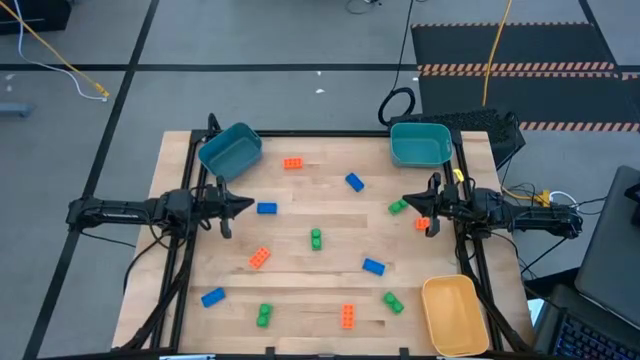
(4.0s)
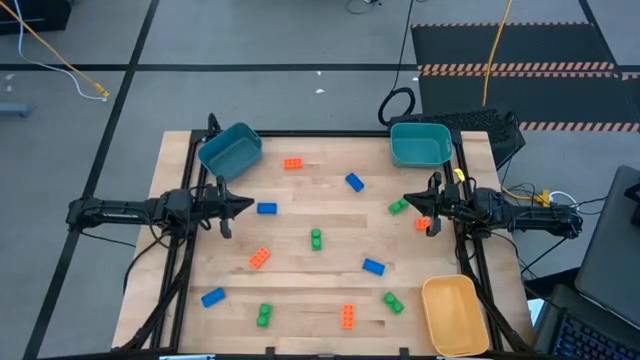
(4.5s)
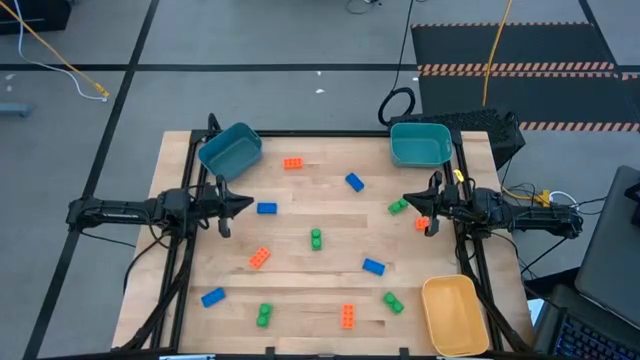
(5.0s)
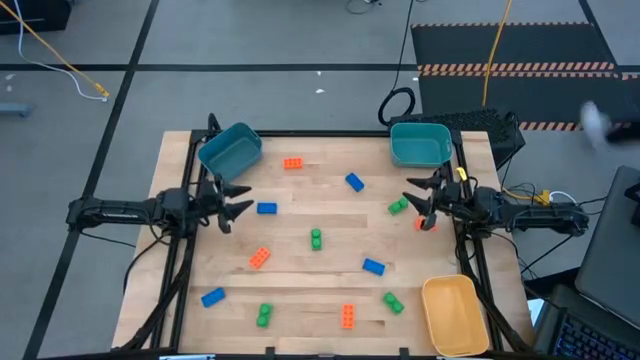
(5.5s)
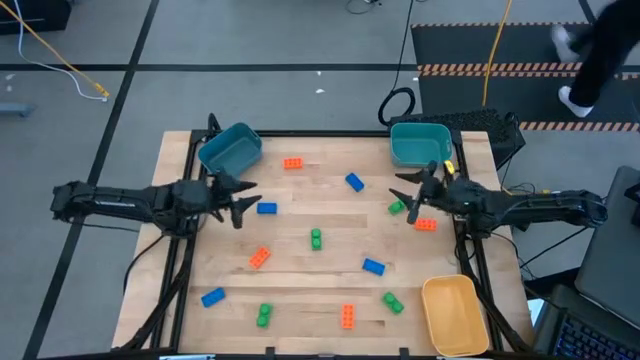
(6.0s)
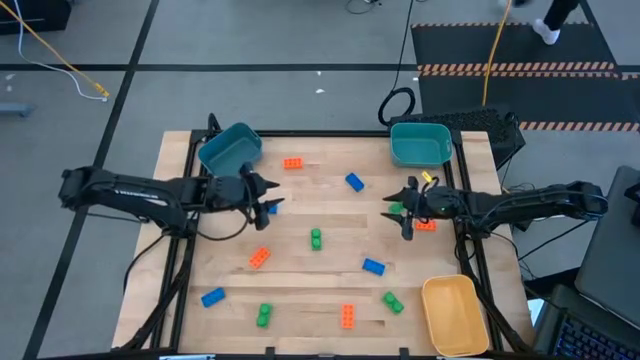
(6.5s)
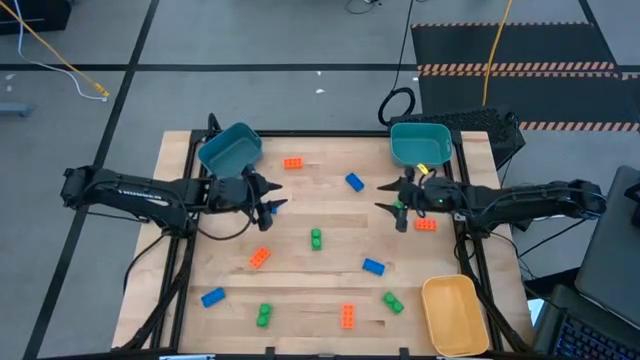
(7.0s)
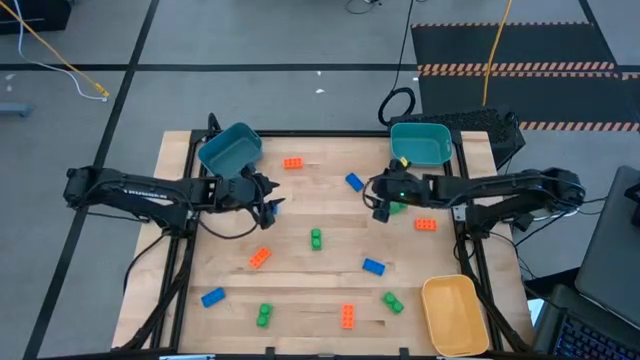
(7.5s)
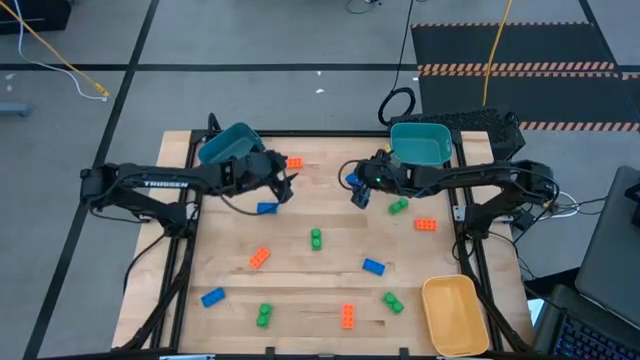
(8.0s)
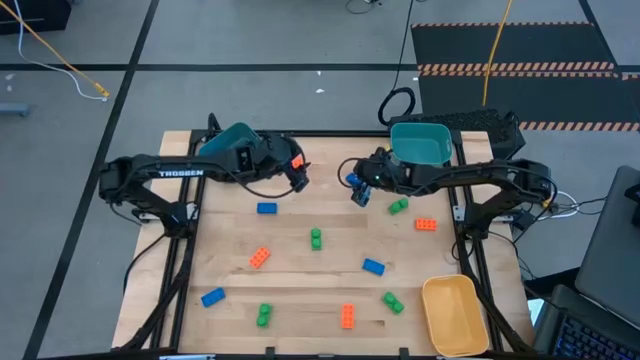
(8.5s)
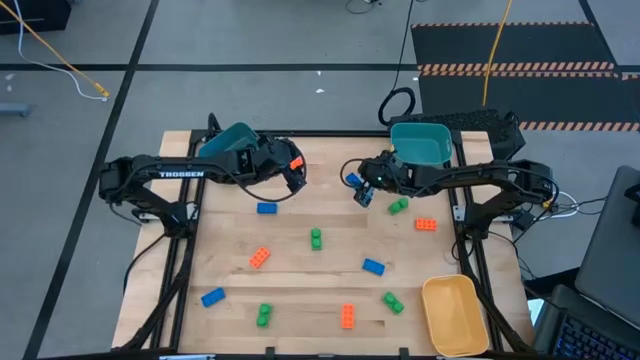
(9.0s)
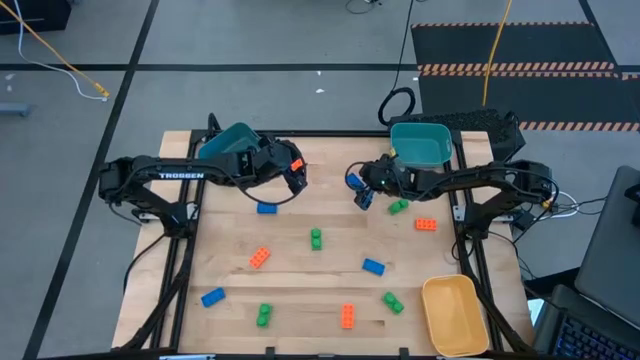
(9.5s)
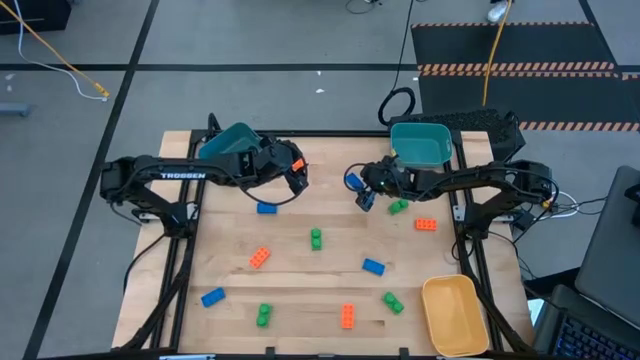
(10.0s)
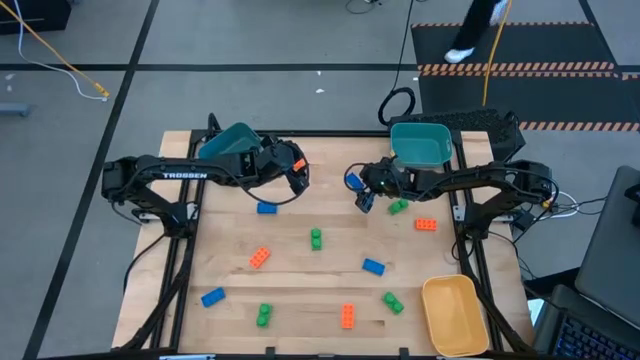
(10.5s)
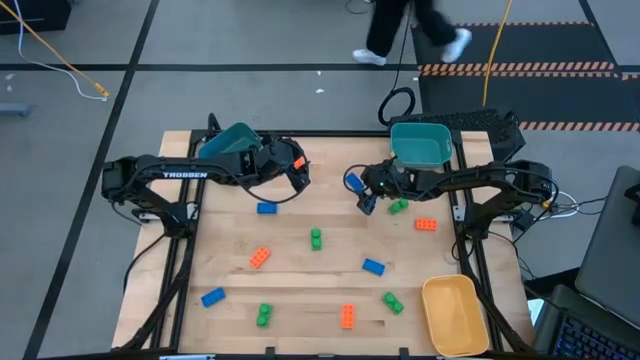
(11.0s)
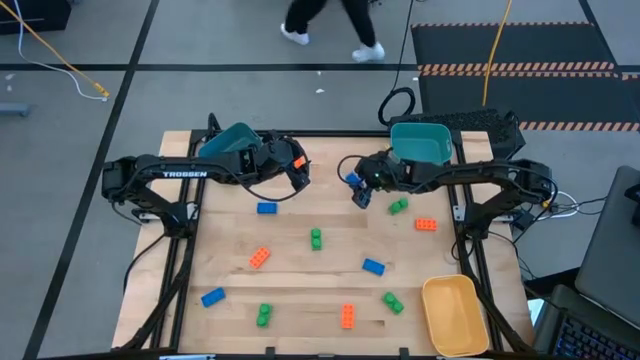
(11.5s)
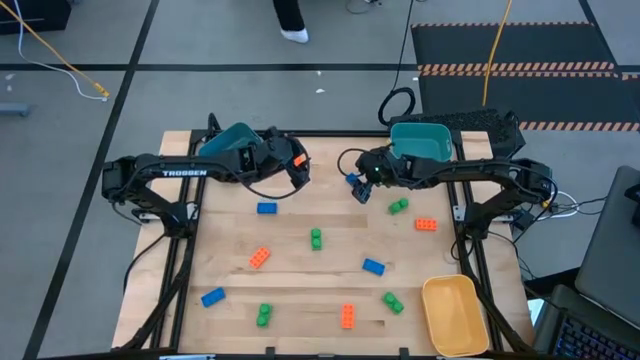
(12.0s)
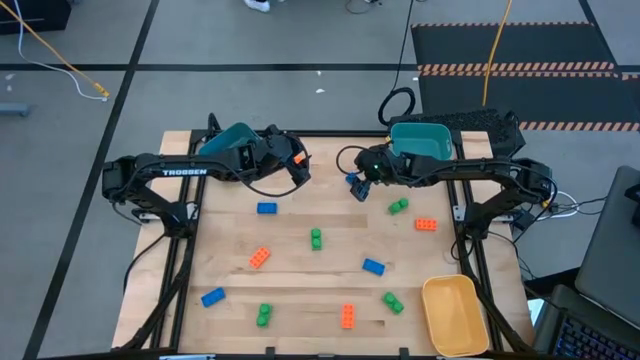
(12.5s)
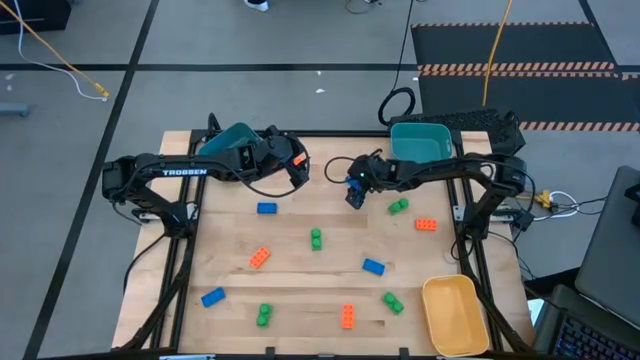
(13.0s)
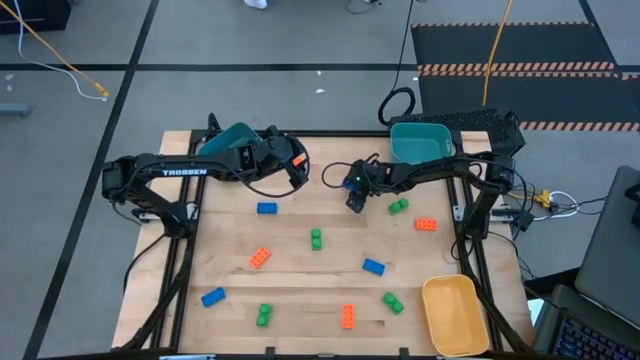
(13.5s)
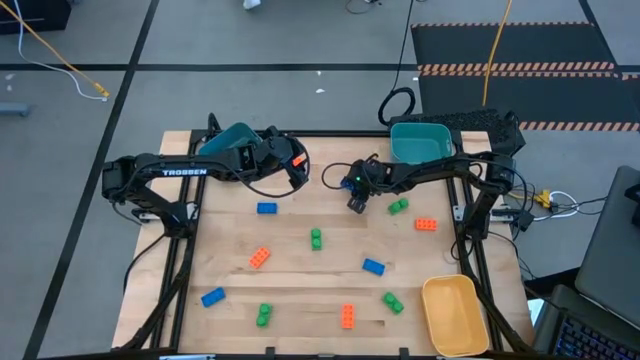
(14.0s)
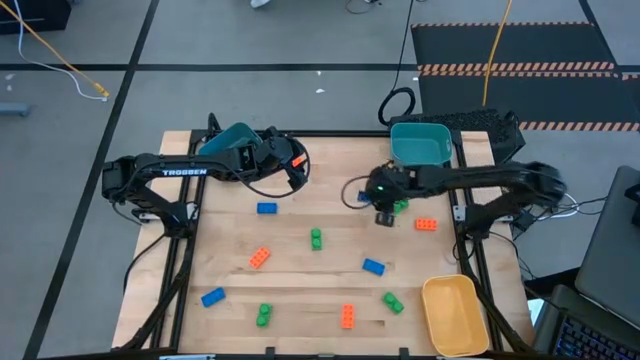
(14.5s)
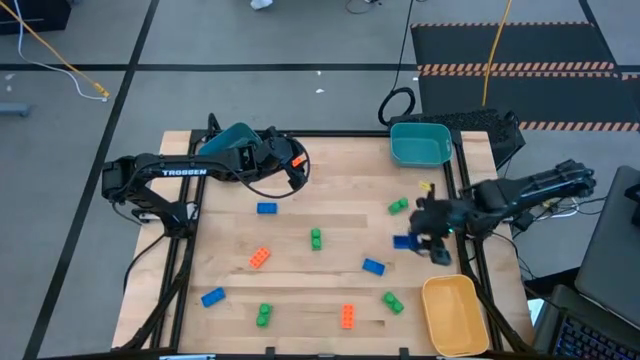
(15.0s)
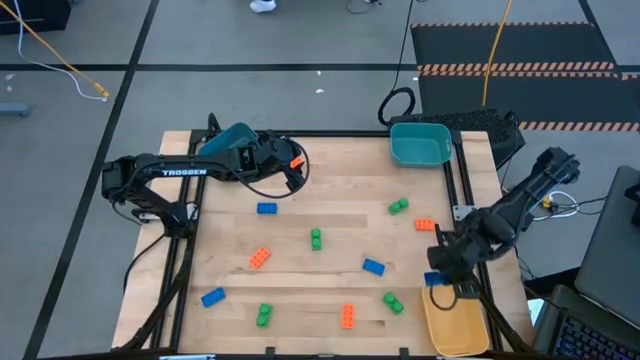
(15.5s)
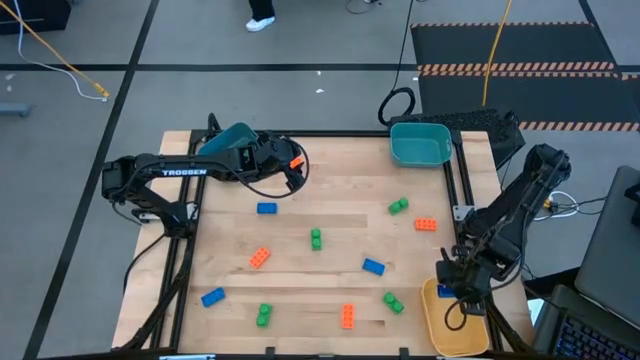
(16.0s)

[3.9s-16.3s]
Task: Sort & place blocks by color
Put the top right blue game piece into the yellow bin

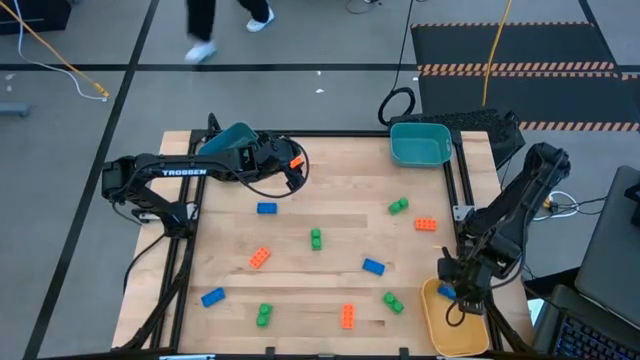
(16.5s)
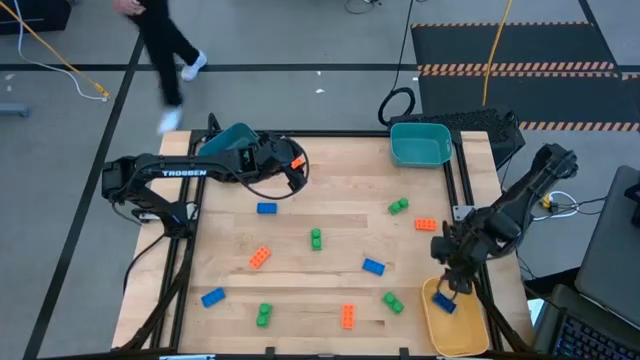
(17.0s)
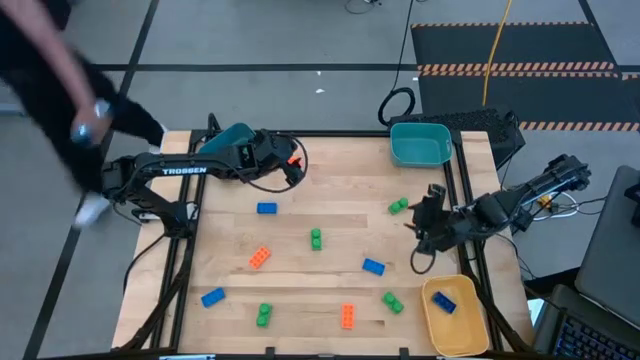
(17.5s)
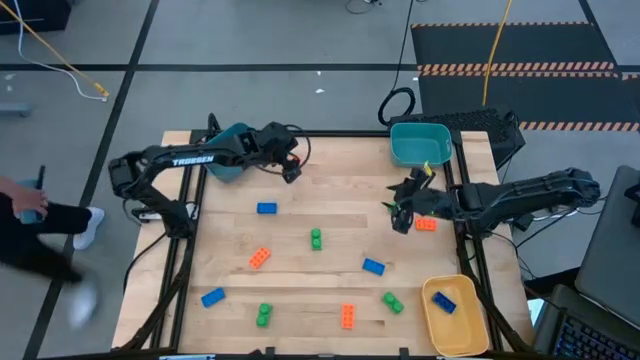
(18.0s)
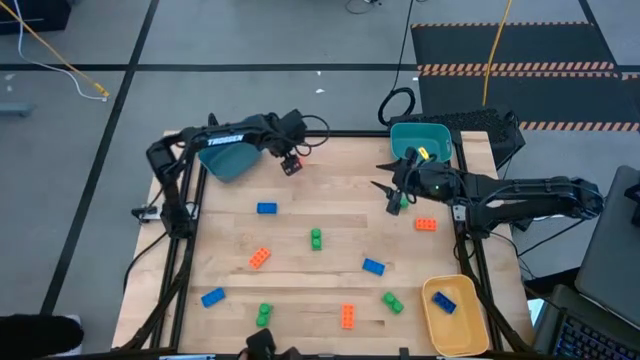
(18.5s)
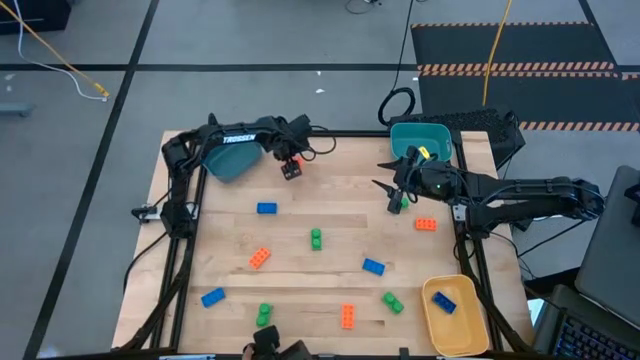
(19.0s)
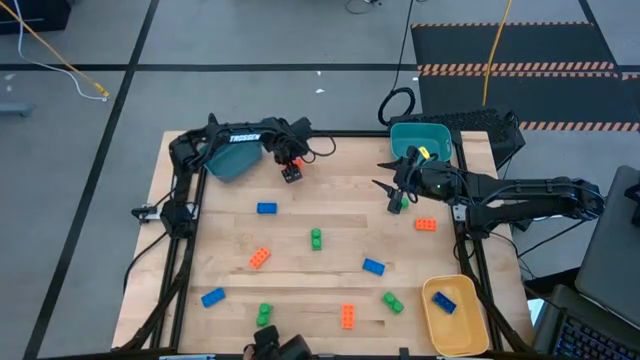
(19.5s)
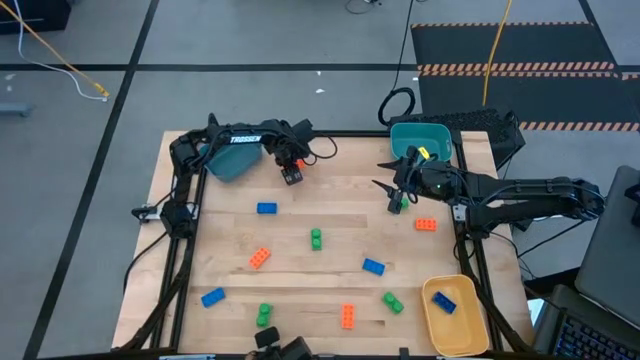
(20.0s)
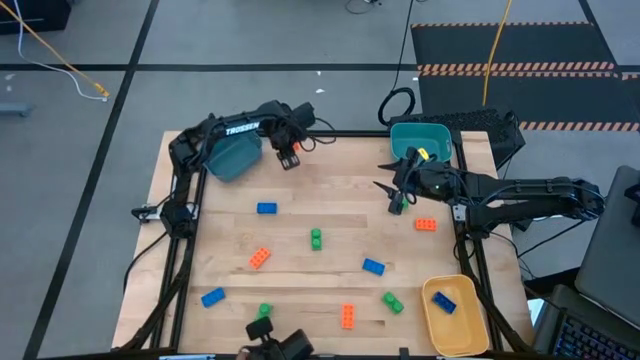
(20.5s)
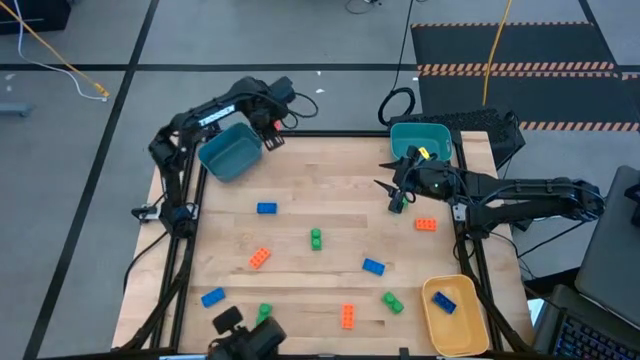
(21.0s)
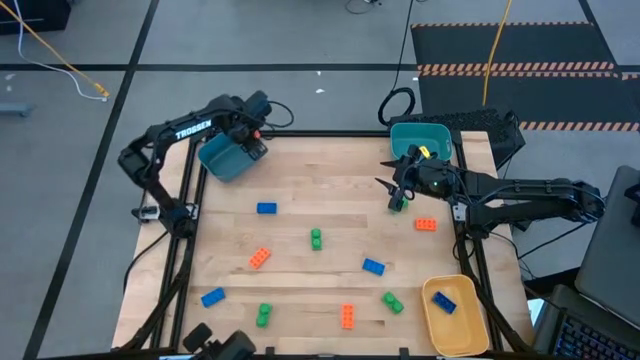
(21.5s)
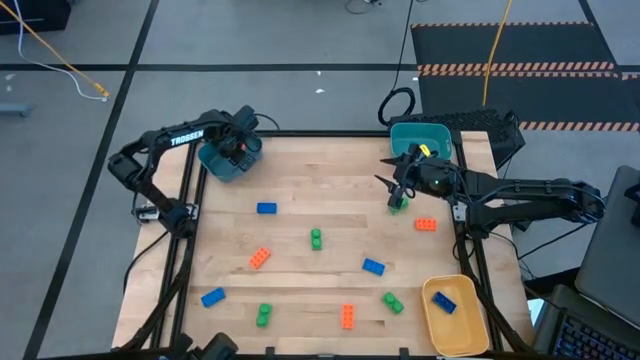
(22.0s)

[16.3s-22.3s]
Put the top orange game piece into the dark blue bin

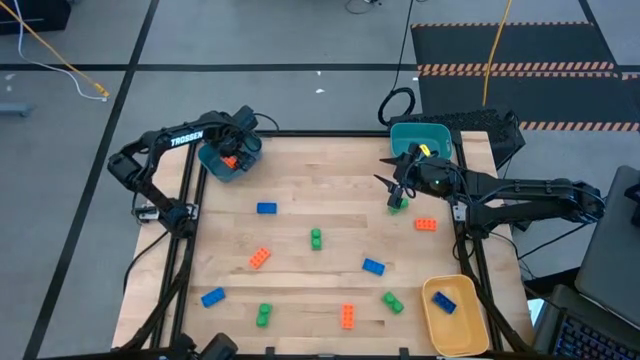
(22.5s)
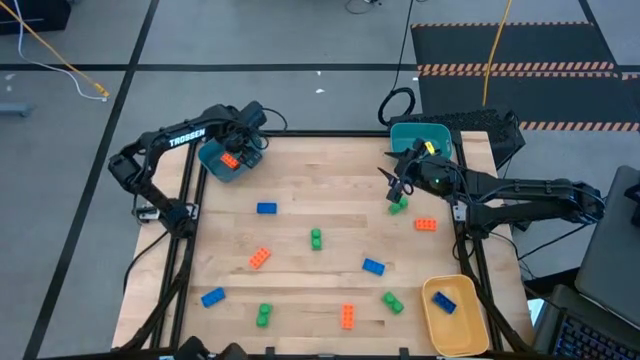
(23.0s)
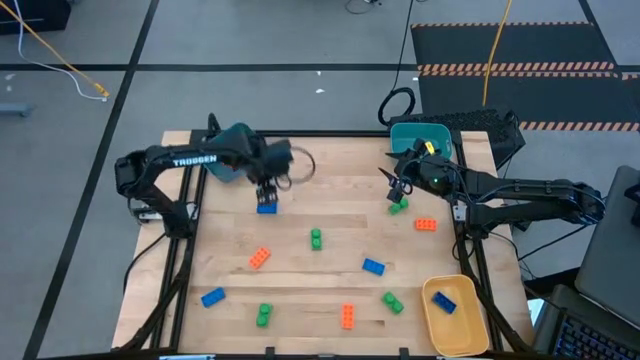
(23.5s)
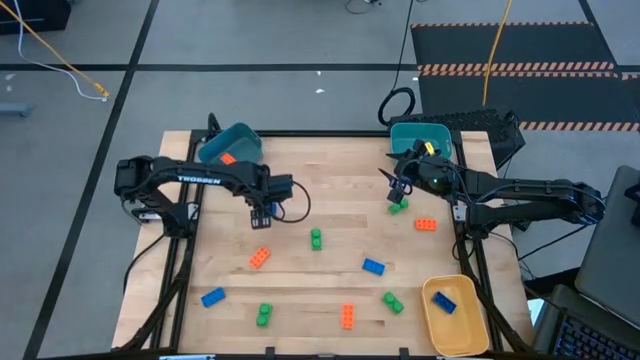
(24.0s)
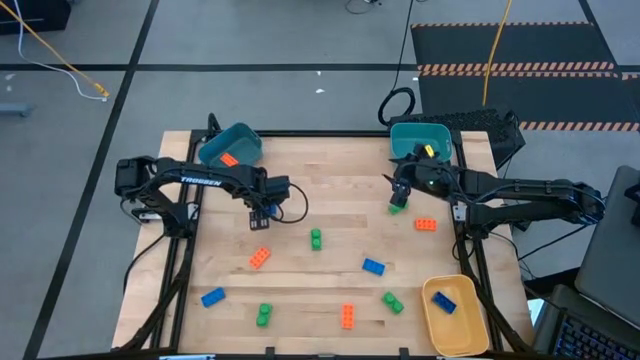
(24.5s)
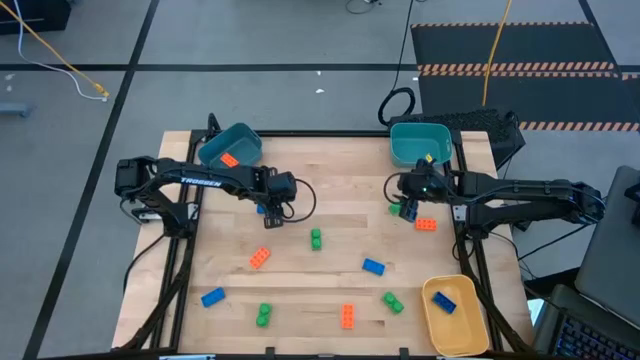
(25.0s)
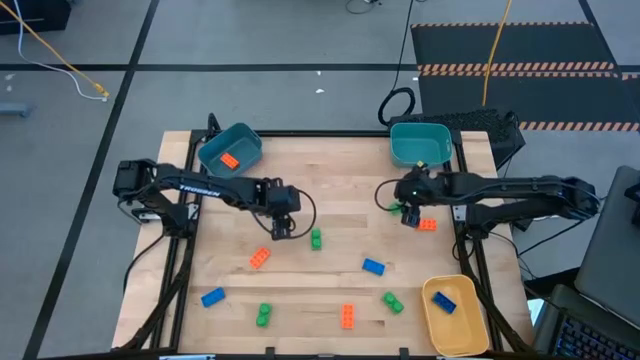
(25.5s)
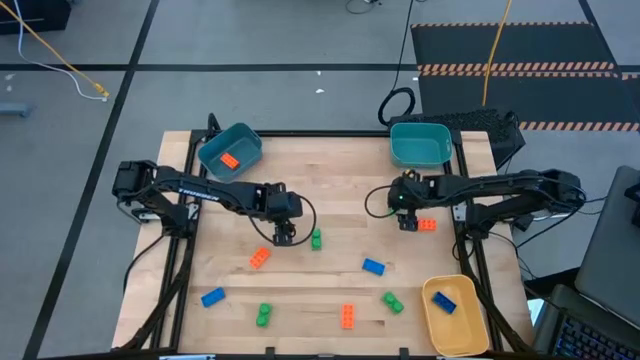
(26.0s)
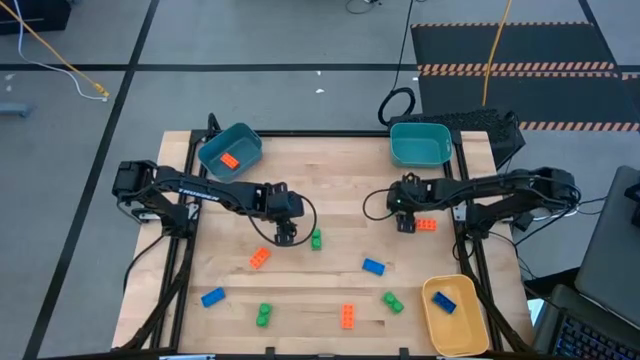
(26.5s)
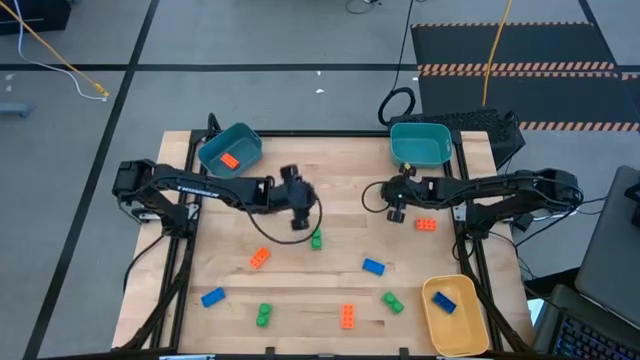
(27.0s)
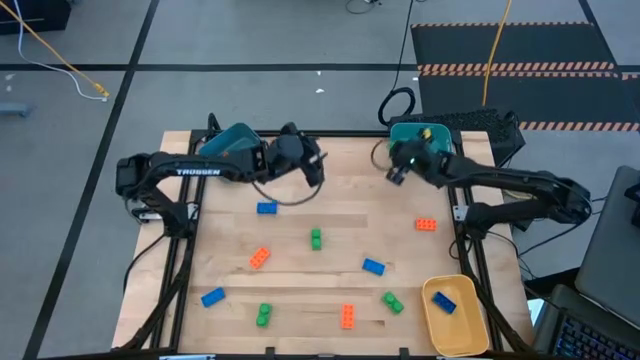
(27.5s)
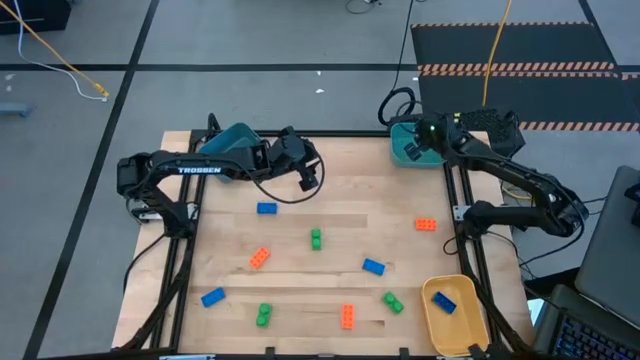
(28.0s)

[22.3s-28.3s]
Put the top right green game piece into the light blue bin
